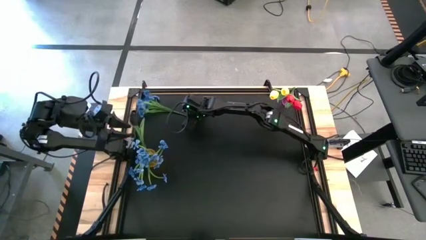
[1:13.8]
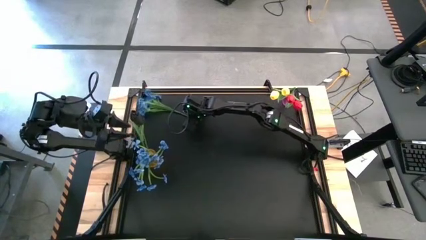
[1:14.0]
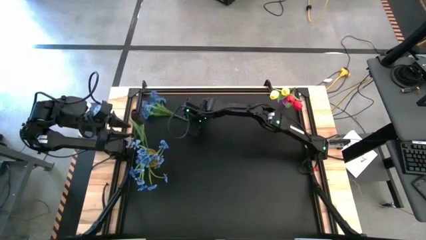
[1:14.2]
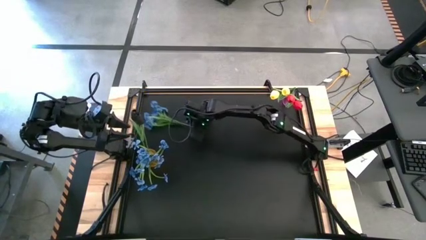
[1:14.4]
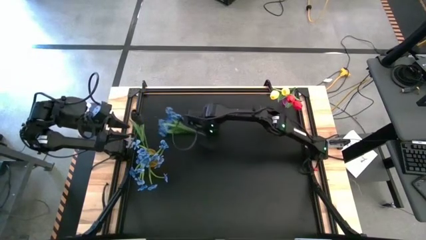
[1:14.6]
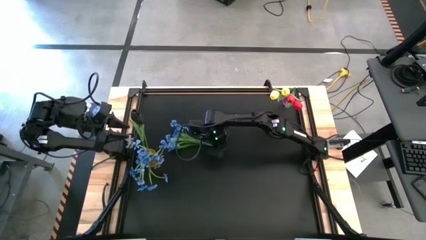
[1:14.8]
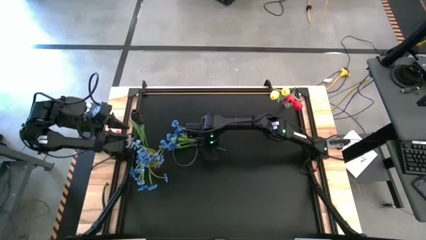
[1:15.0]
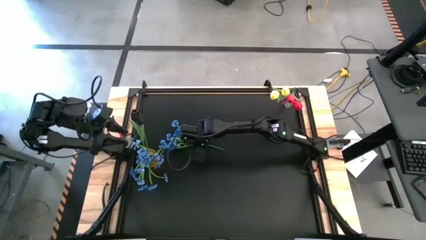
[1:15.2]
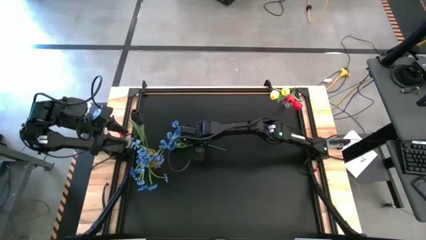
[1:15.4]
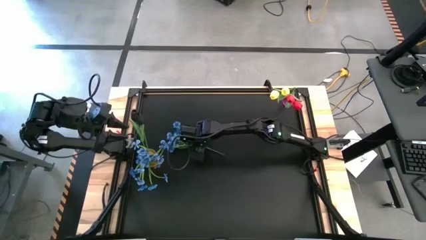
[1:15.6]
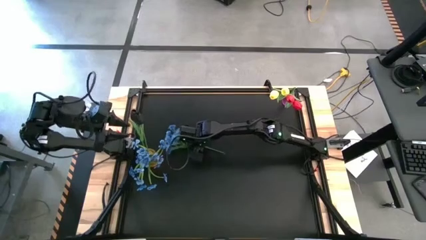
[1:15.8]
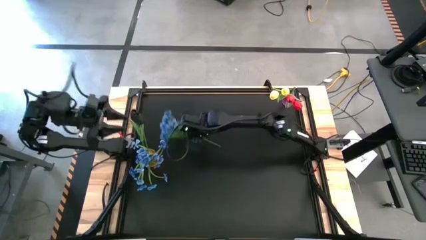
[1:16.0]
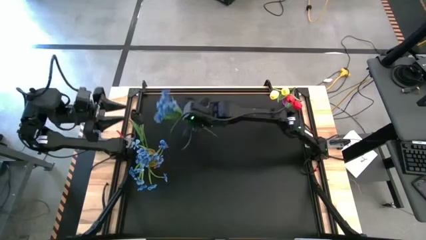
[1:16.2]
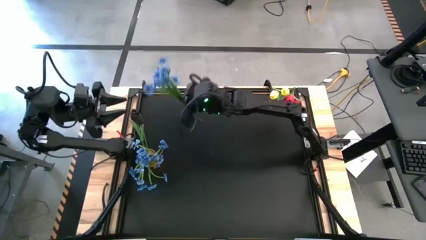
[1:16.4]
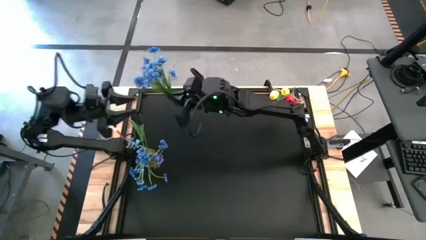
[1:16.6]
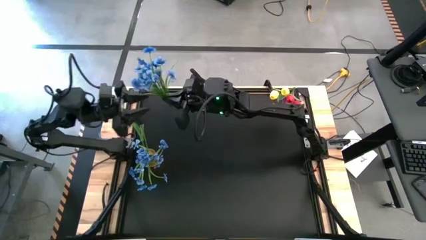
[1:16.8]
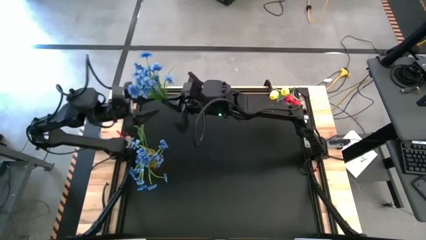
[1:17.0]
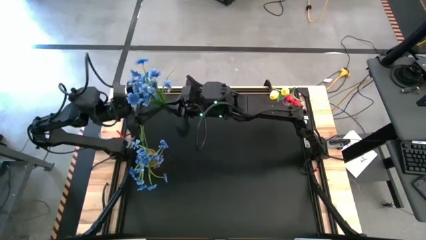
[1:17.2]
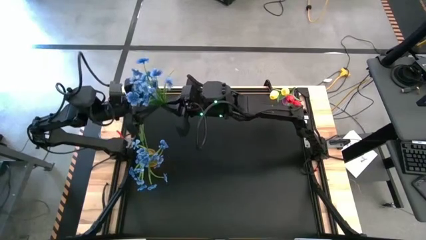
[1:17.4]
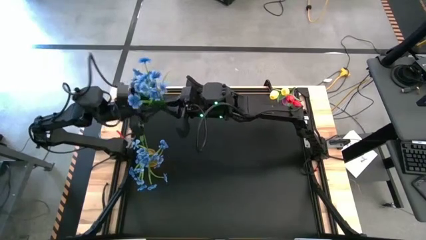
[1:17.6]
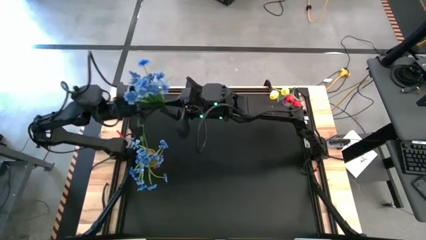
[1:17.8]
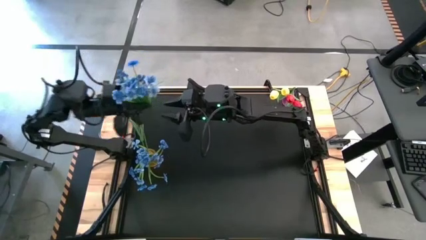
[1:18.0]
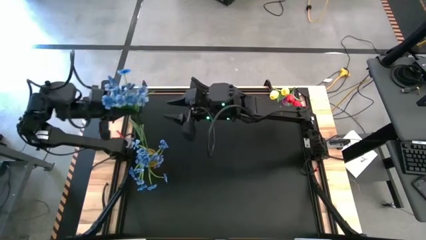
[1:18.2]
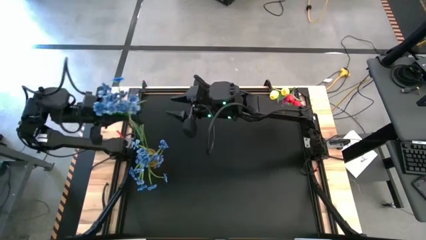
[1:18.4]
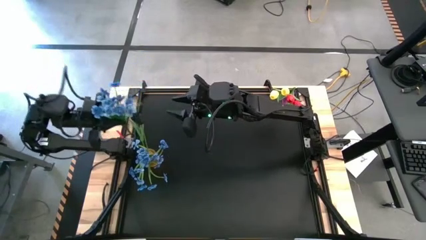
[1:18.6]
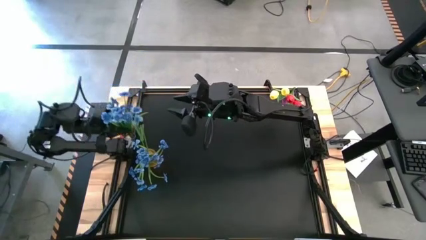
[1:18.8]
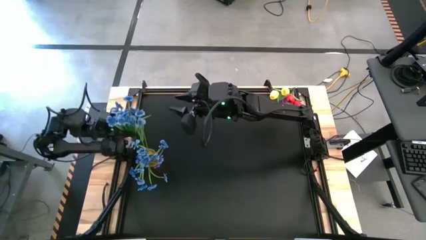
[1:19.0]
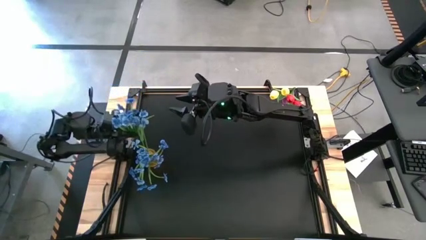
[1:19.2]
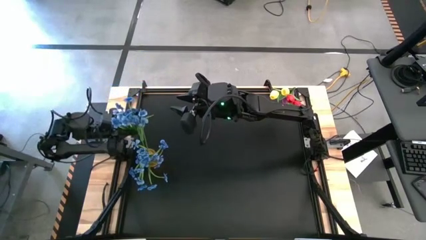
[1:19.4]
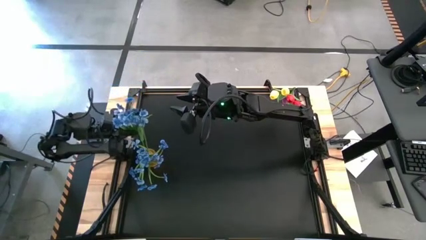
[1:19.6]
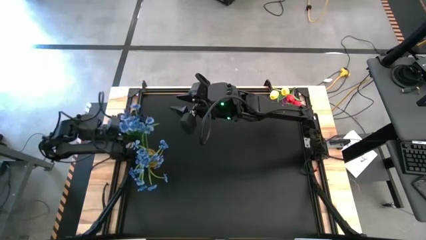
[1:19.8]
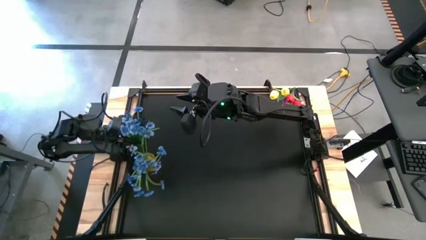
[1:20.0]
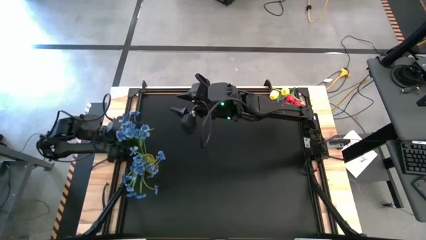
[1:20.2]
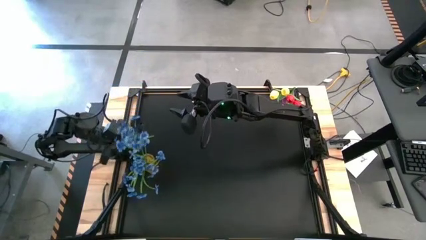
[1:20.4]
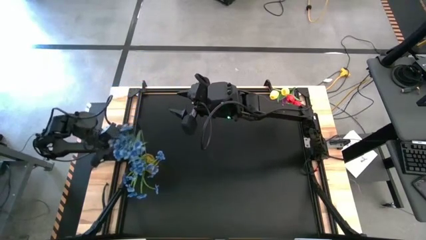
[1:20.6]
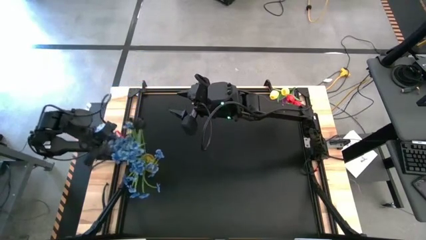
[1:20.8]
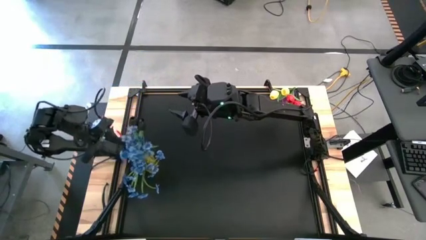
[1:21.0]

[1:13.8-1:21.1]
Task: Sort flowers into vase by color
Put the blue flower into the yellow vase

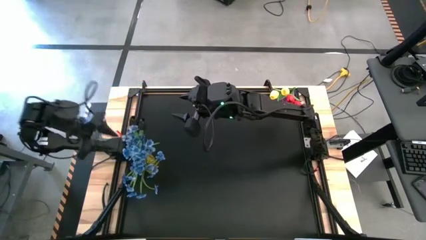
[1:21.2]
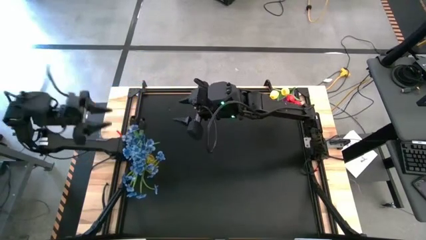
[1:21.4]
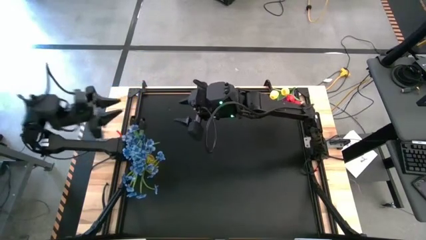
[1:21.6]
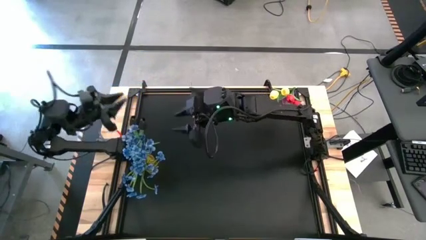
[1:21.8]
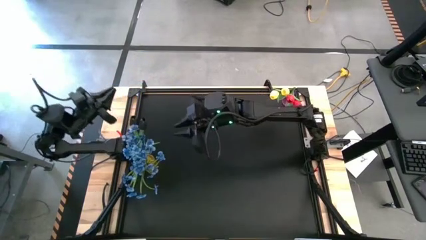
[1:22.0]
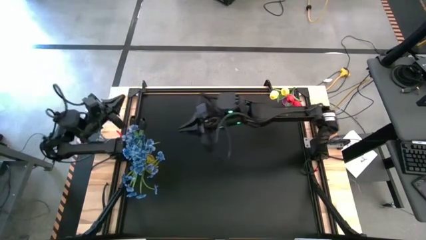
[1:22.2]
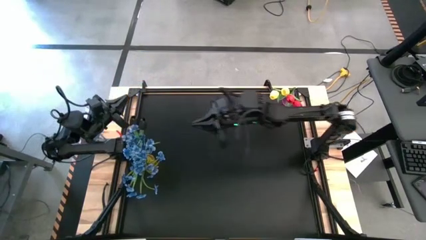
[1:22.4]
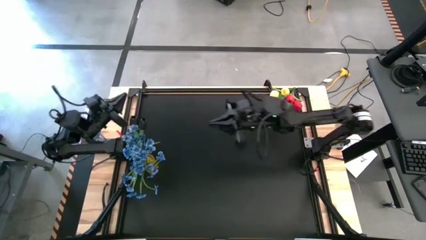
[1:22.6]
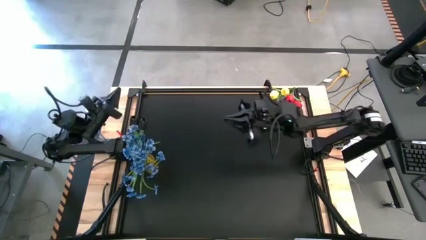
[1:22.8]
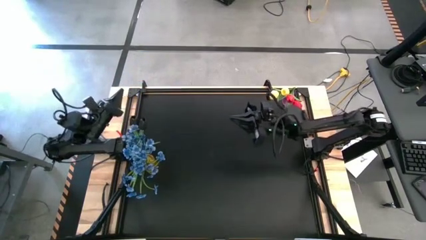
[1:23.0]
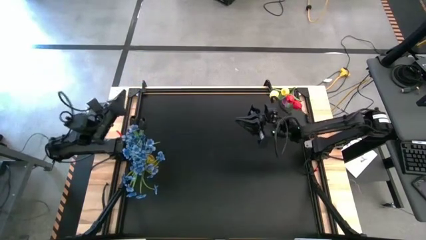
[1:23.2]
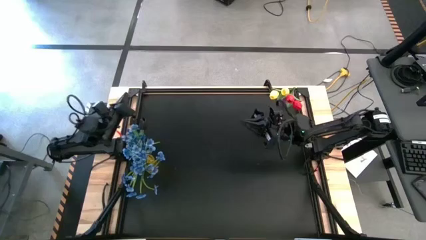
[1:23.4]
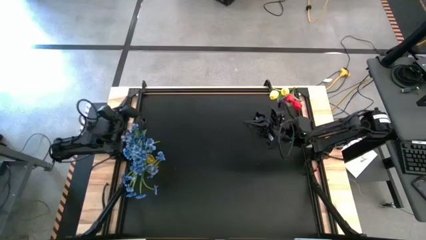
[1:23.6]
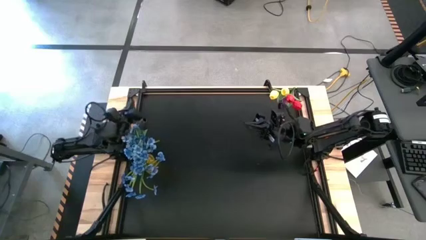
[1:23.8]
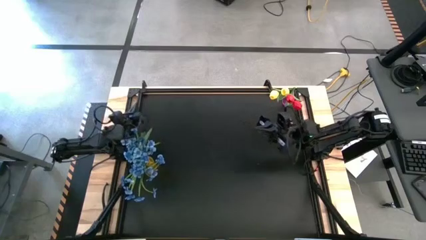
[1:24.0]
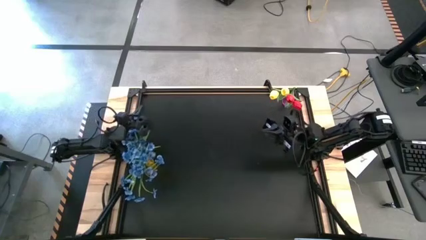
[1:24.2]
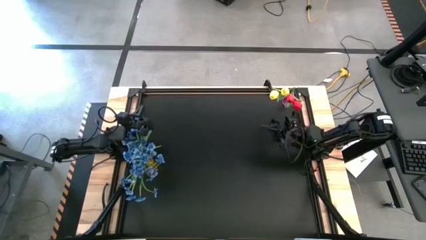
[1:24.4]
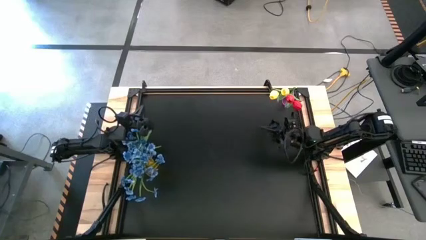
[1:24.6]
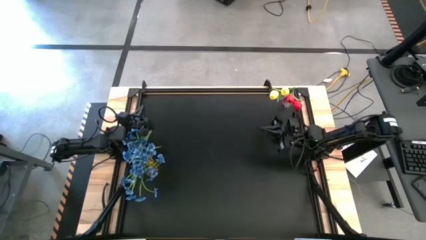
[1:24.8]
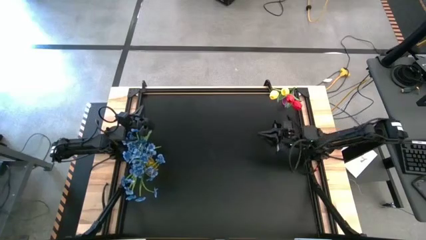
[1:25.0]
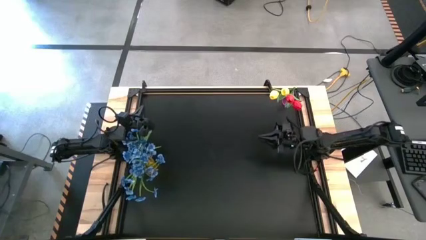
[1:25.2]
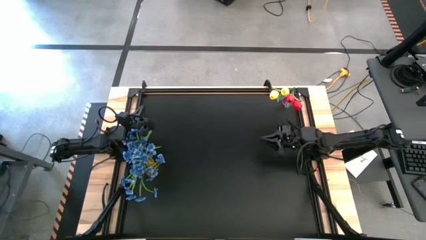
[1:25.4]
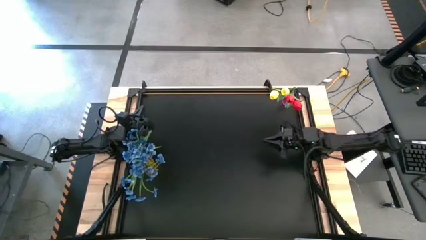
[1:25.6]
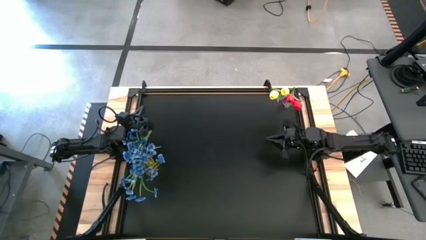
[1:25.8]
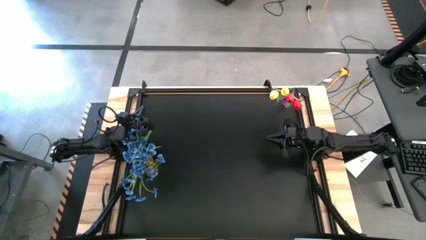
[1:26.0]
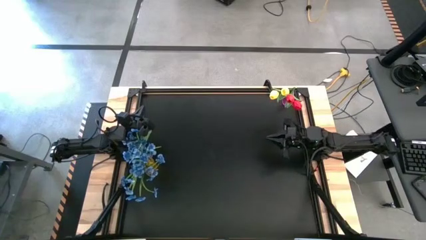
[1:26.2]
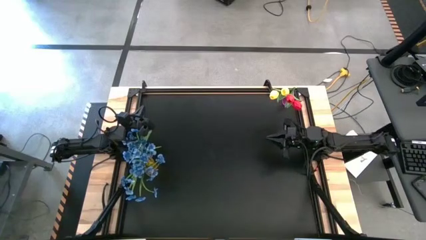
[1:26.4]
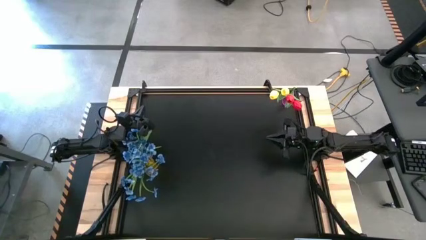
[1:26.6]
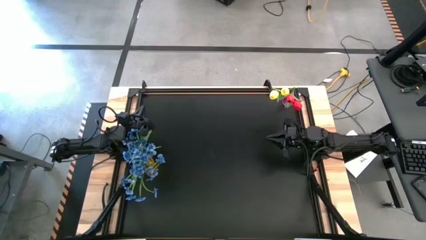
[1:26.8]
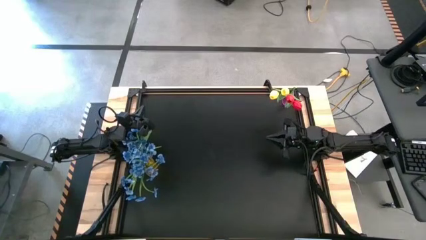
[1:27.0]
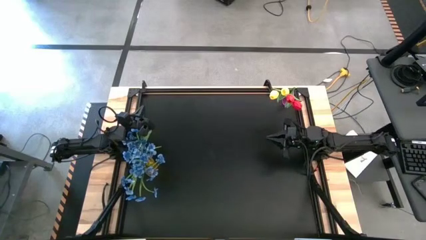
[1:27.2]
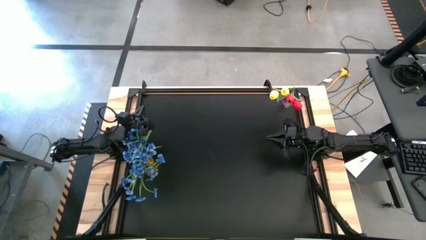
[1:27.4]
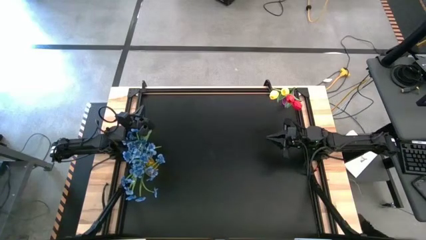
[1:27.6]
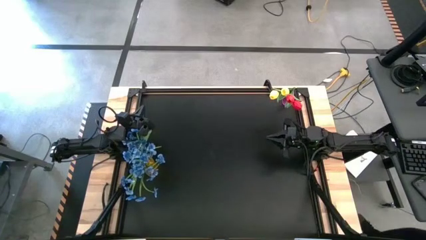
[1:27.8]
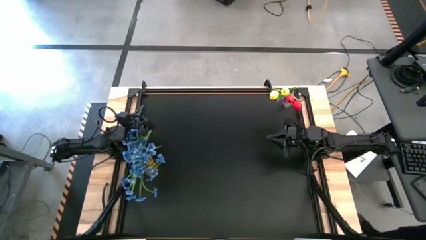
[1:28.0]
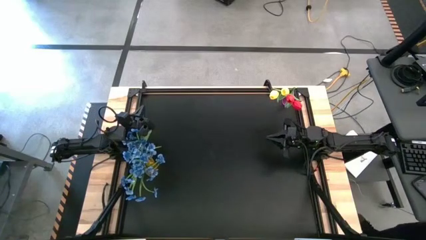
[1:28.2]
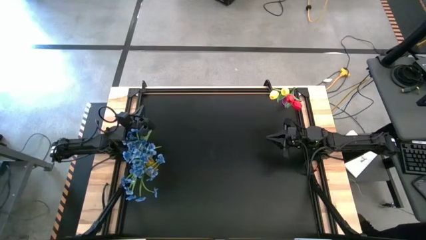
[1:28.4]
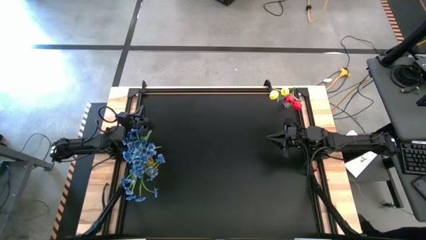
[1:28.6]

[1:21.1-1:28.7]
Return to Home Position

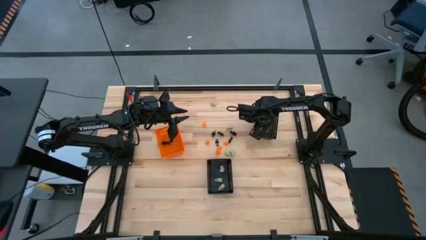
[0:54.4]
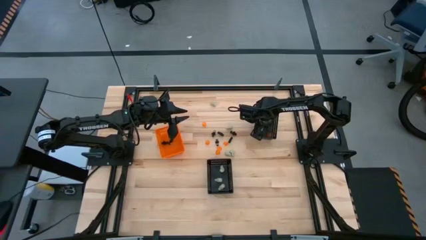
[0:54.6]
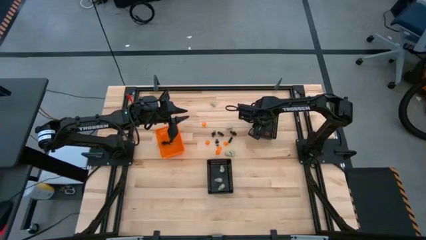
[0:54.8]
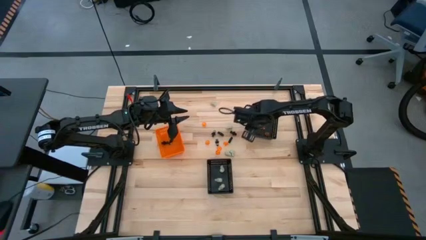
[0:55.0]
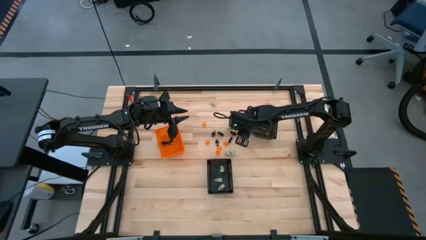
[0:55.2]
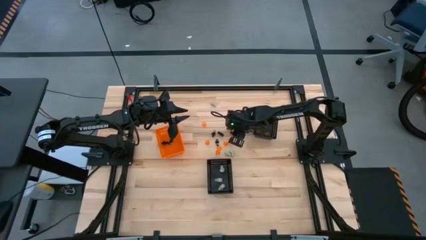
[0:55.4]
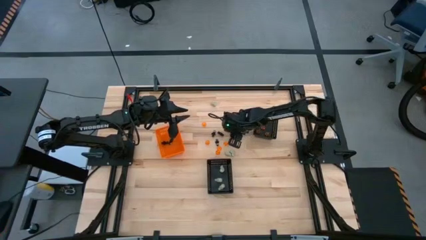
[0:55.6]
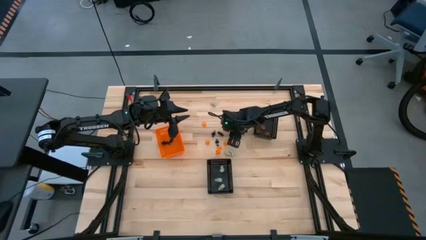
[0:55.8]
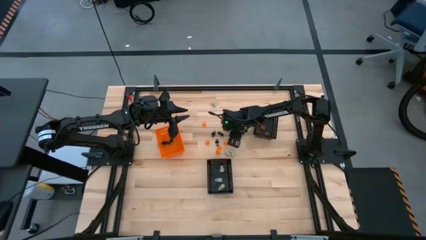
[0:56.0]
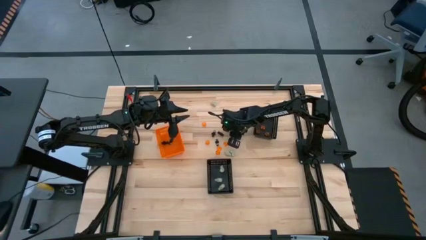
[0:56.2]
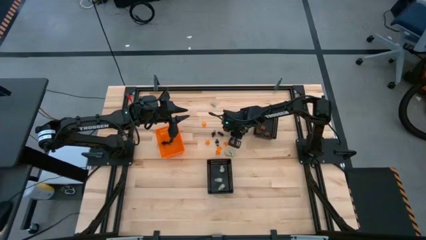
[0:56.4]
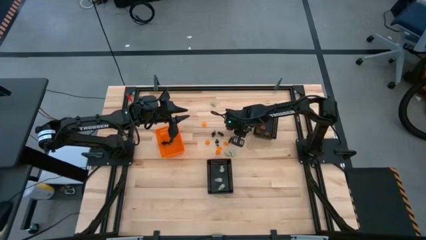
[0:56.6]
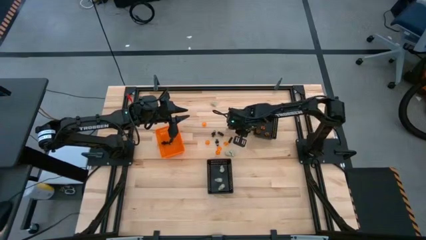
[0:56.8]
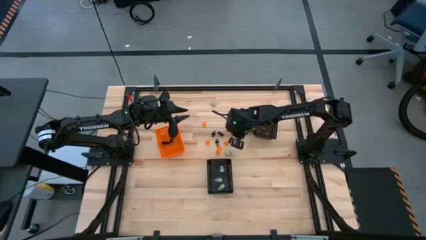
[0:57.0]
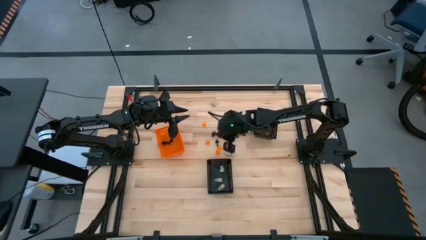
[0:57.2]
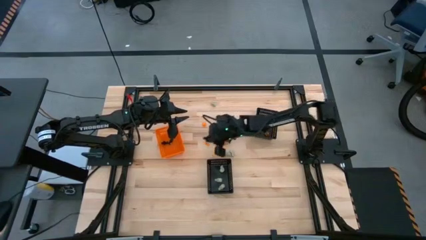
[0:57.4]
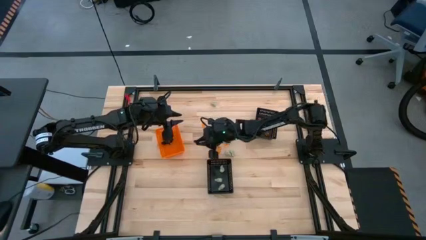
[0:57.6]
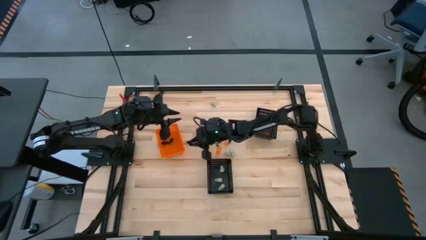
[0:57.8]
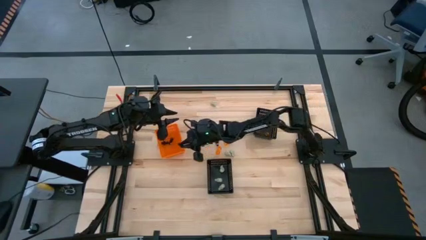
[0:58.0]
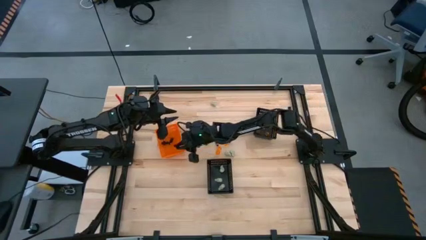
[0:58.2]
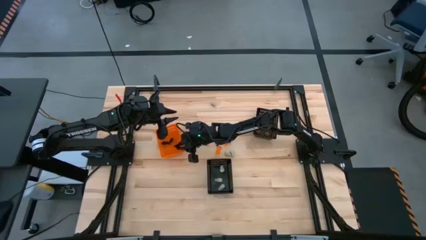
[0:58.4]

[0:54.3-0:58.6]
Task: Sort Halloween decoration
Put the black skeleton toy into the orange bin
